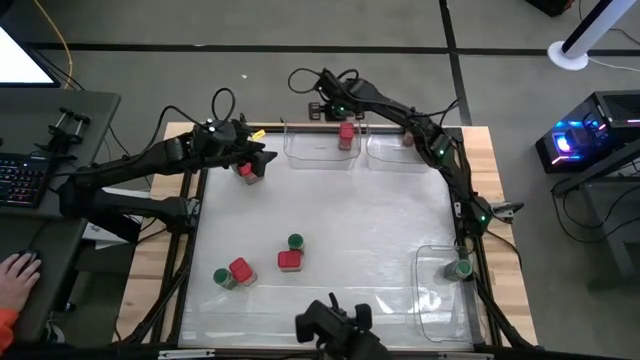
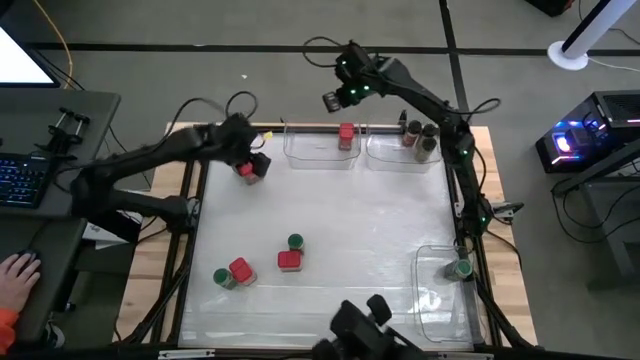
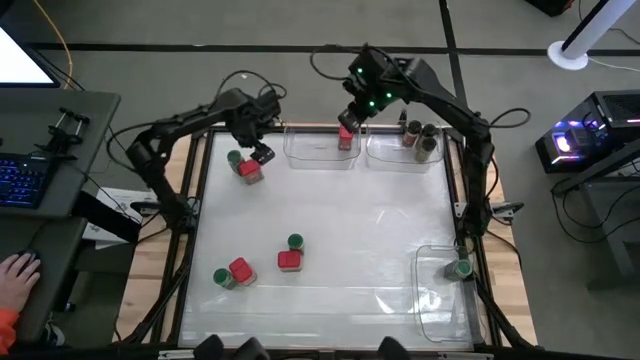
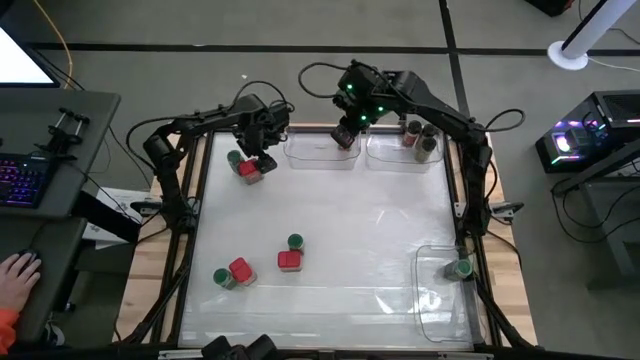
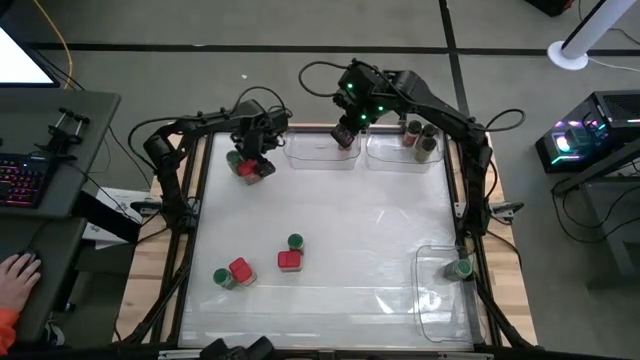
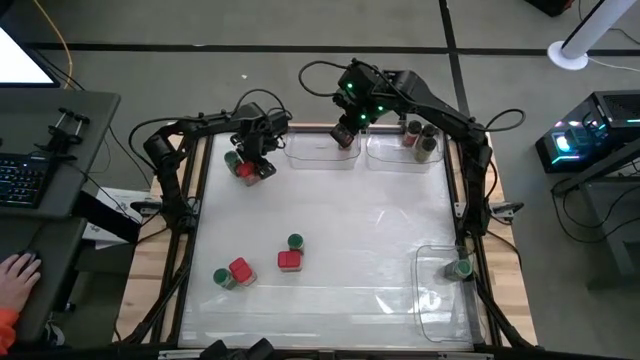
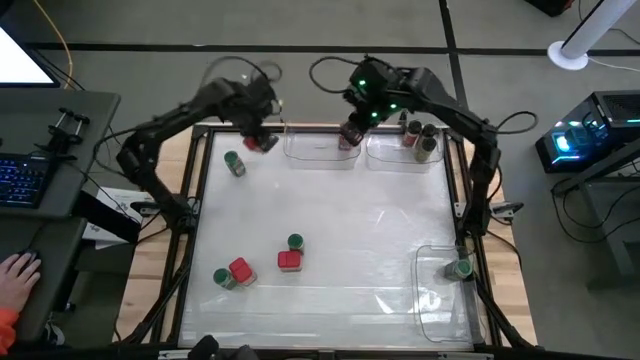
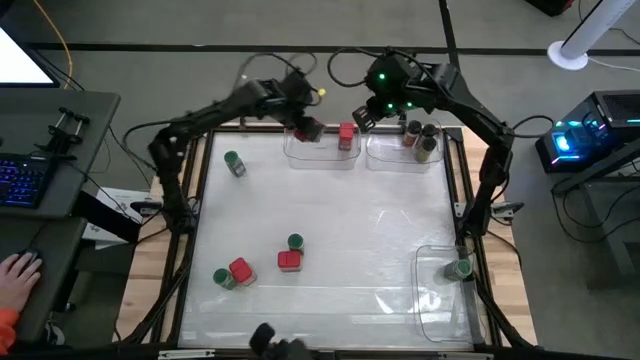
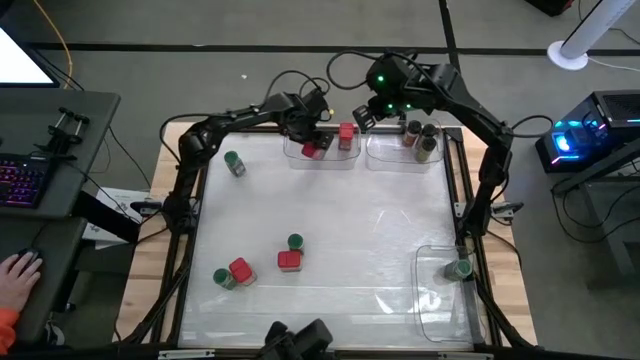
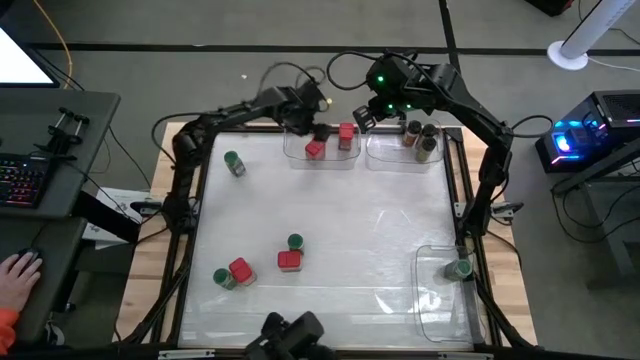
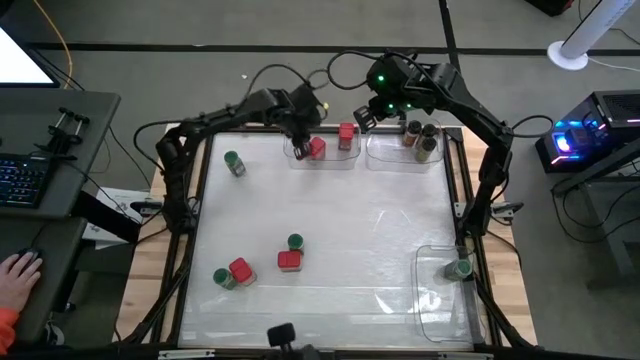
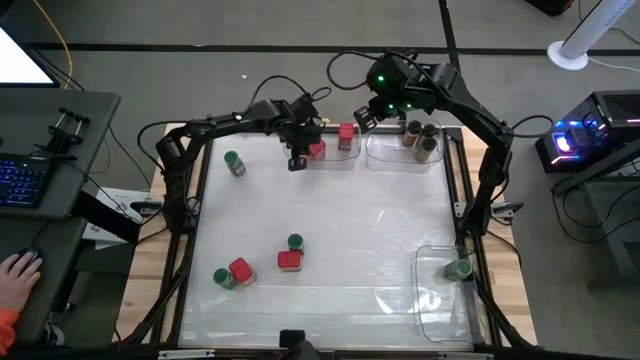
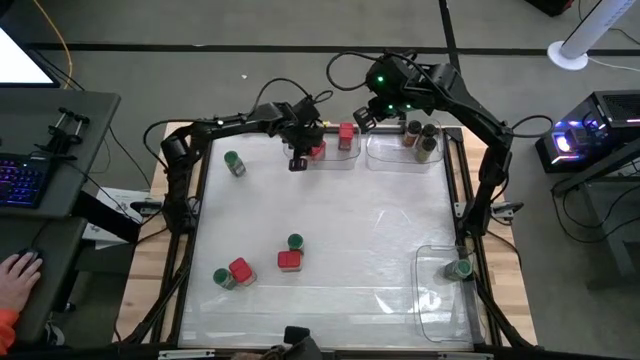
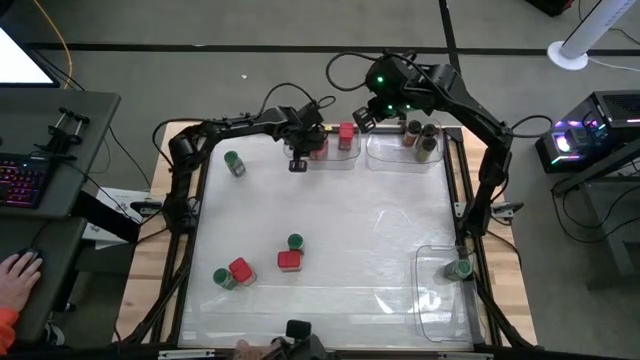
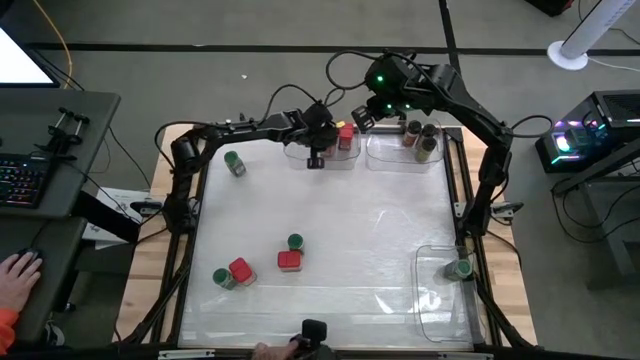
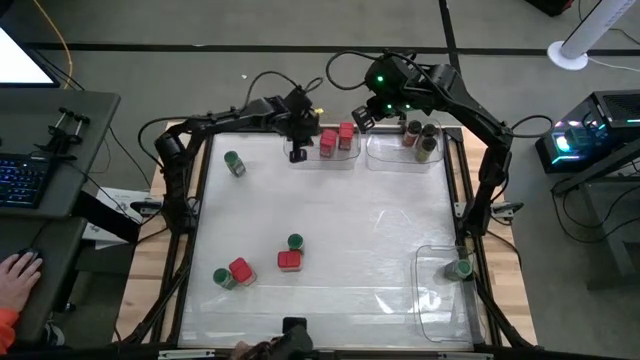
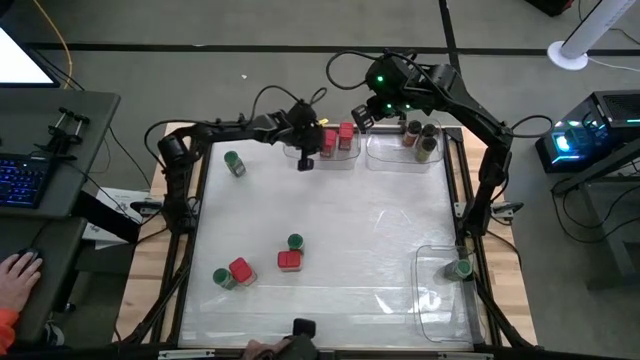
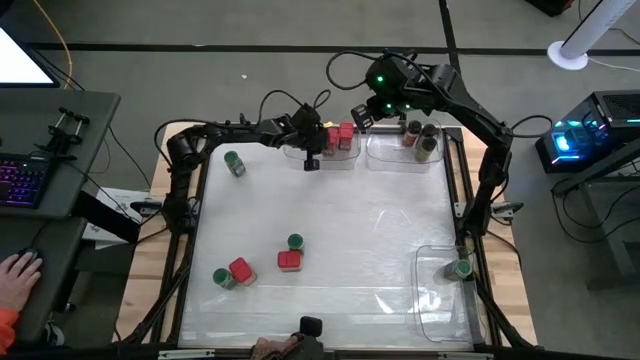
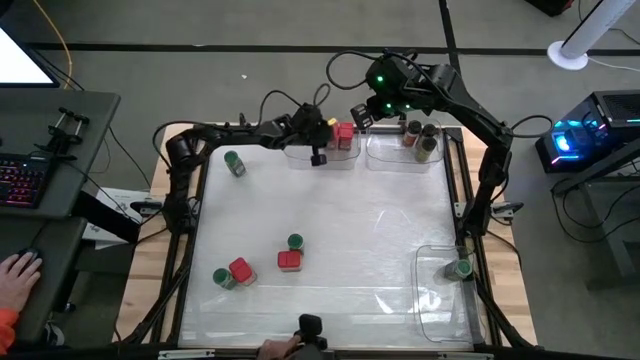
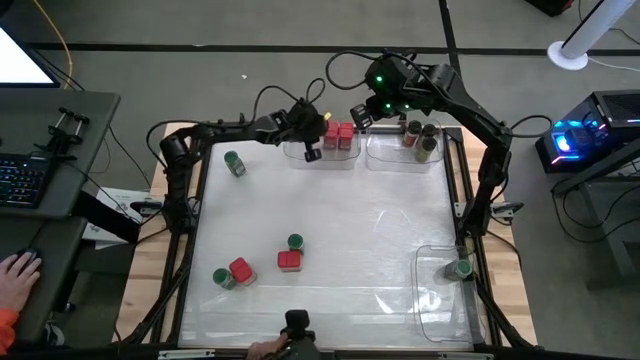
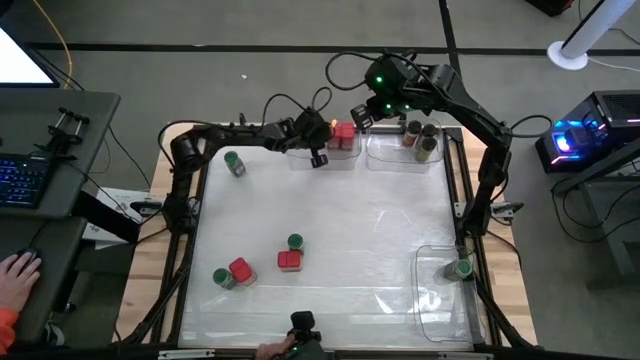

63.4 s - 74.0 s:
Task: Sort spices by type
Put the red seasoning can into the left transparent bin

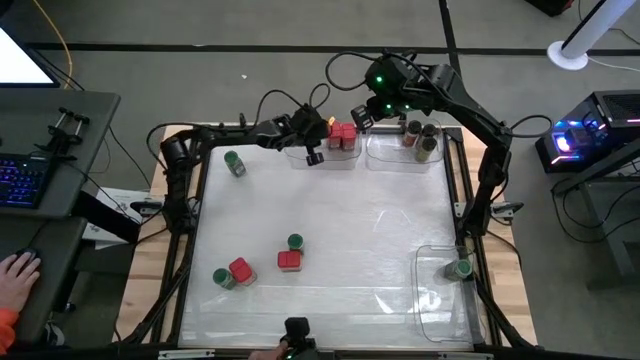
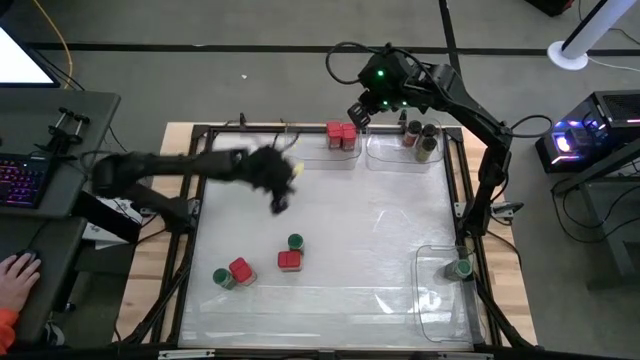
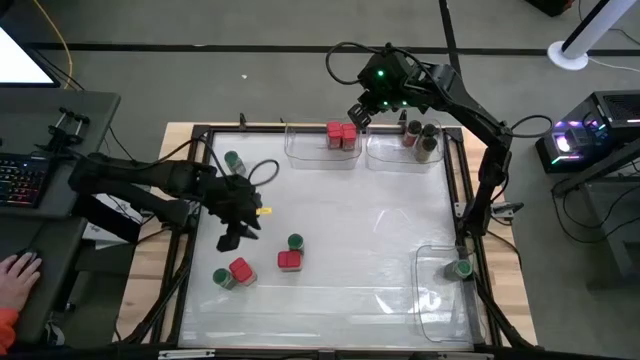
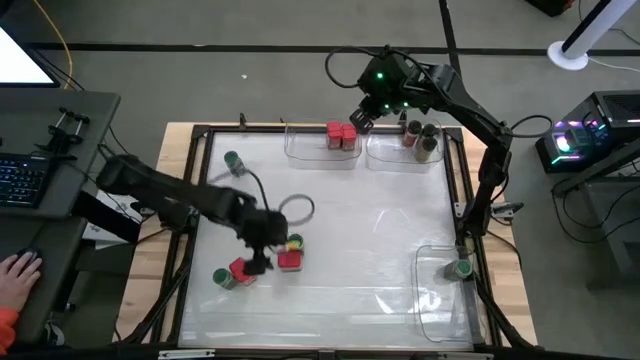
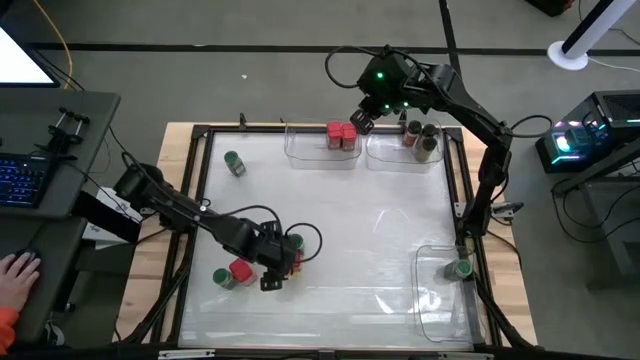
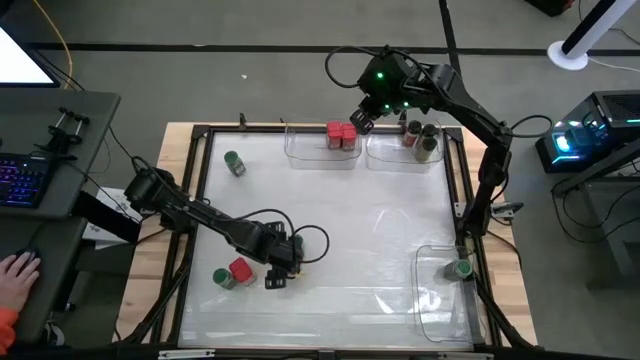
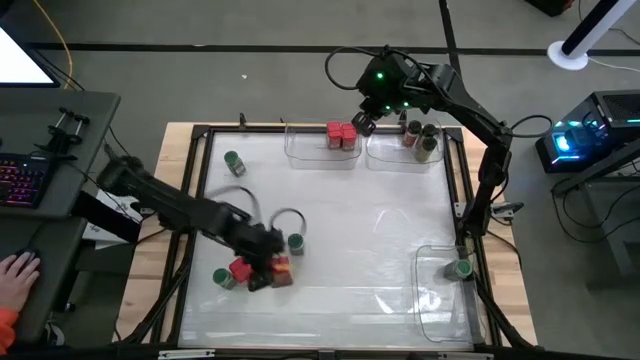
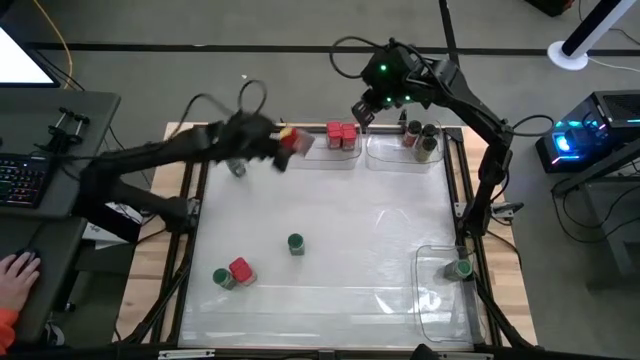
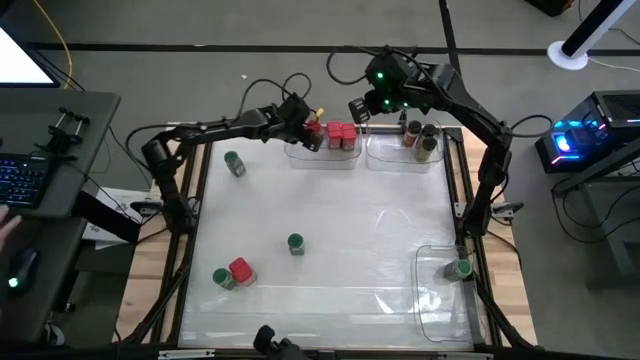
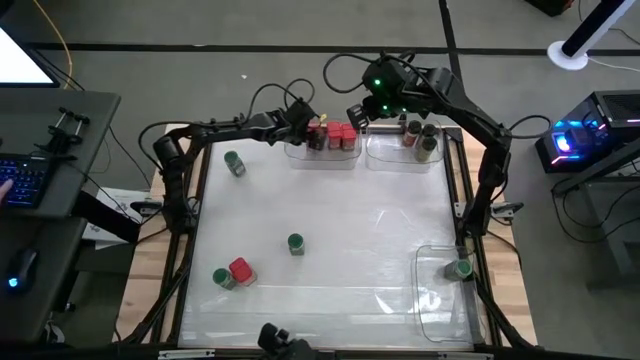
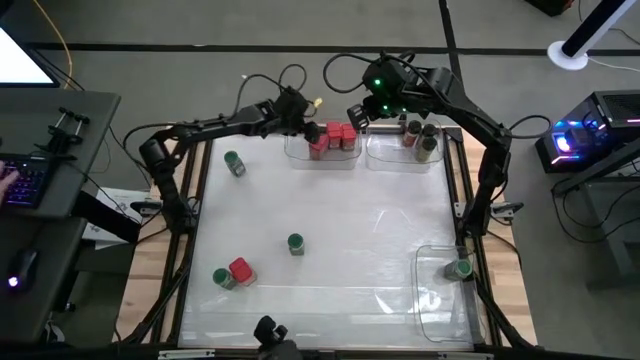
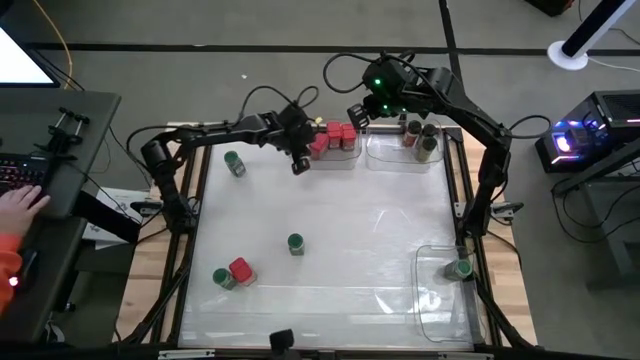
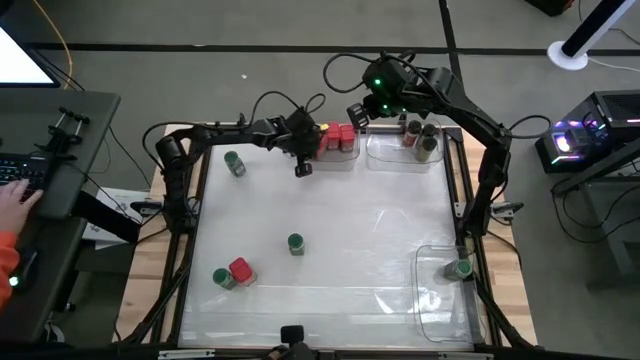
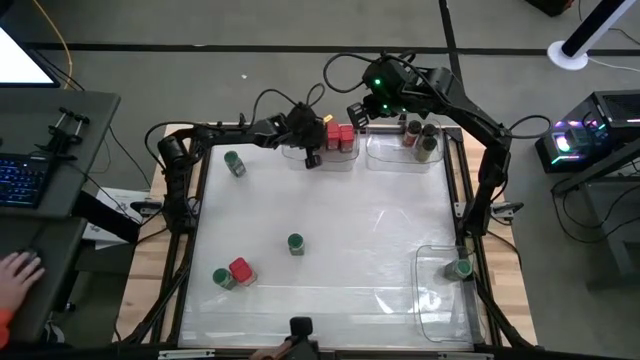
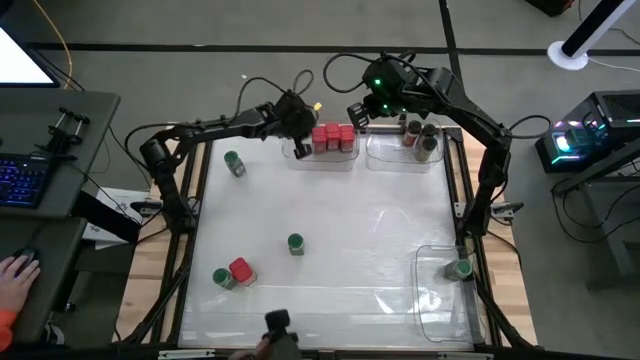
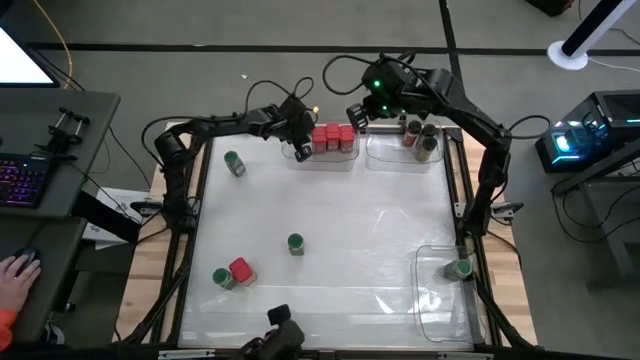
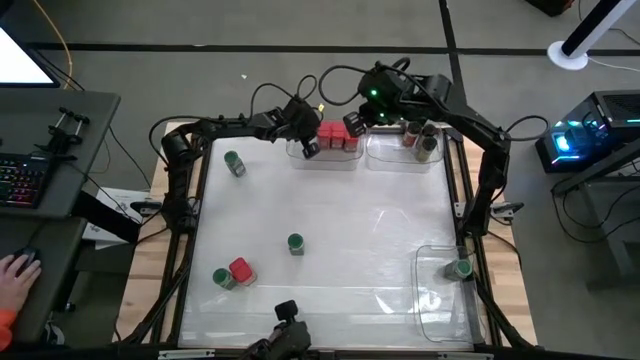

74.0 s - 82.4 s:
Put the red seasoning can into the left transparent bin

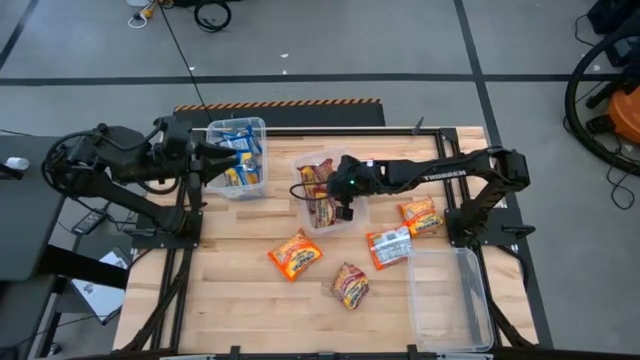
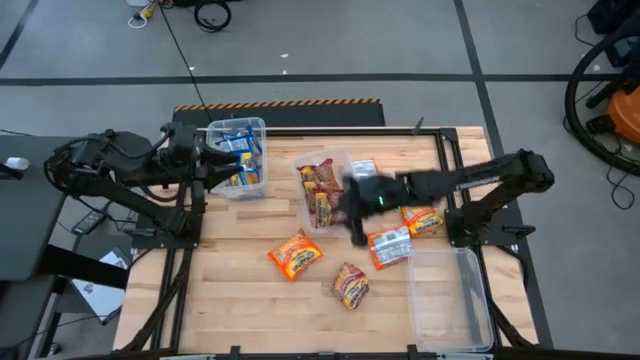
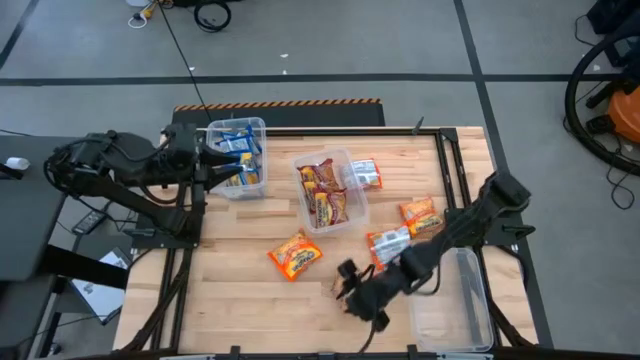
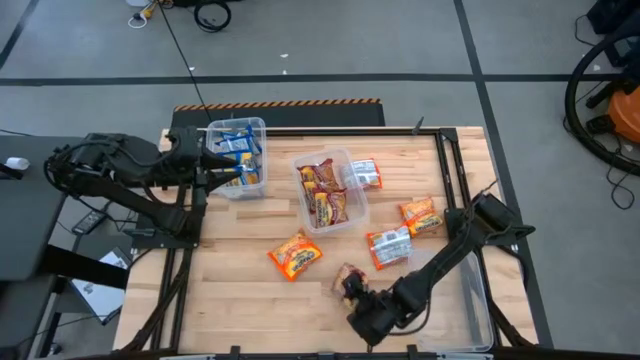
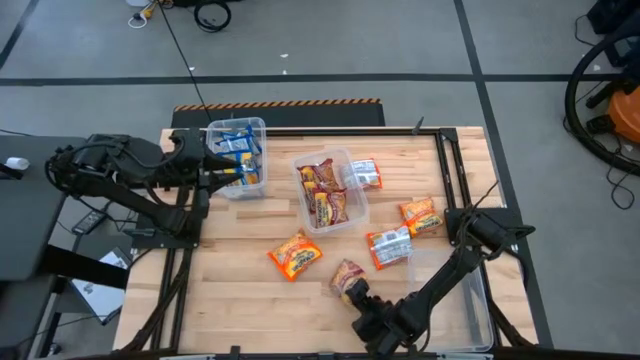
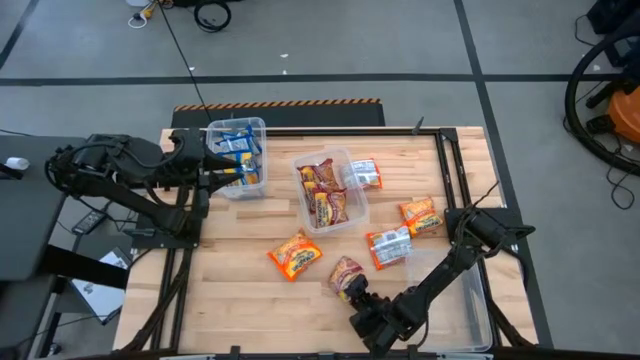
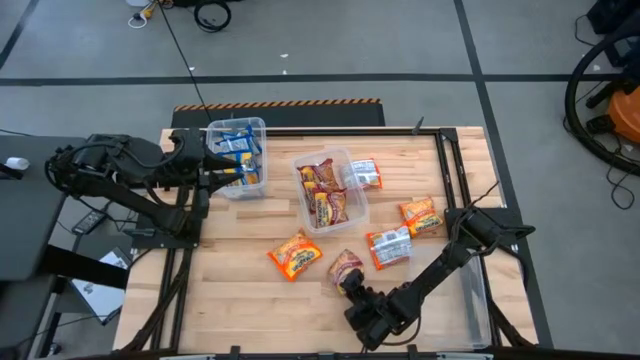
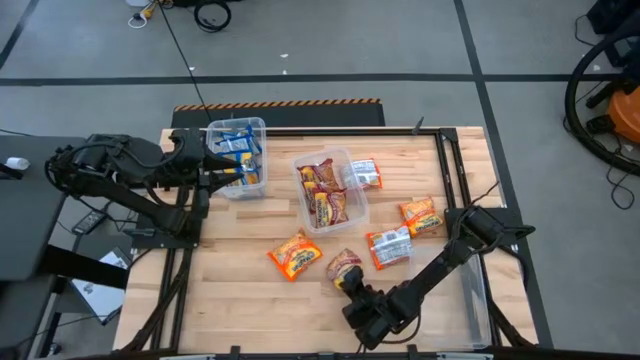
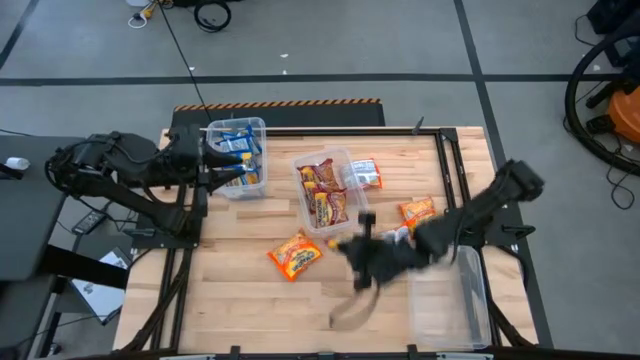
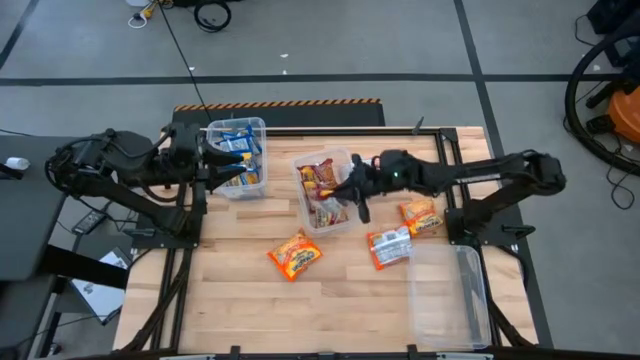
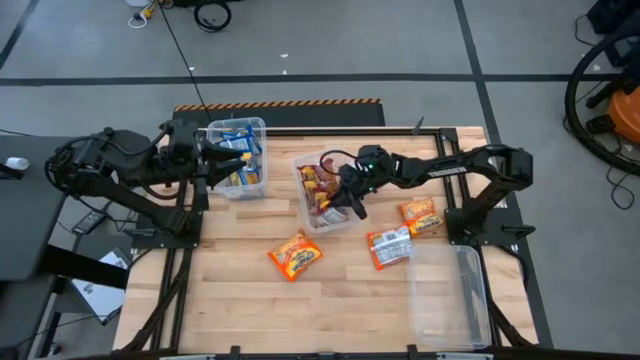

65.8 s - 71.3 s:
Task: Sort Maruchan noodles
Put the red noodle pack into the middle transparent bin
